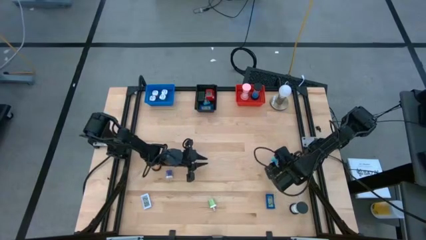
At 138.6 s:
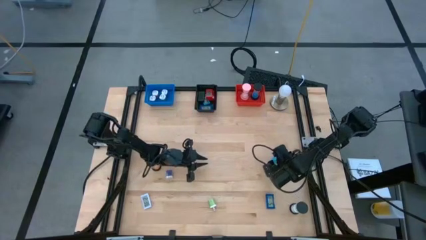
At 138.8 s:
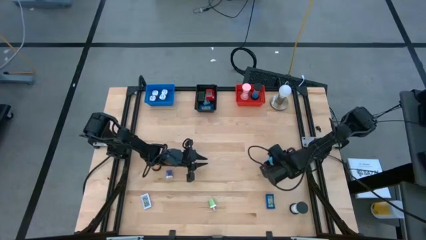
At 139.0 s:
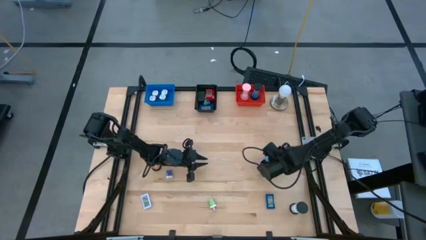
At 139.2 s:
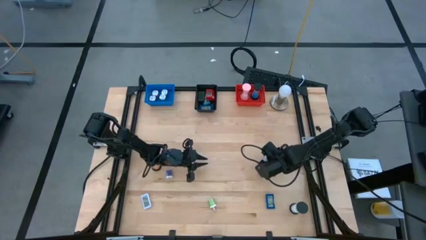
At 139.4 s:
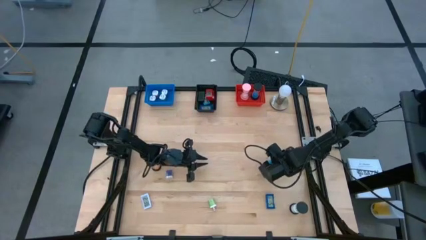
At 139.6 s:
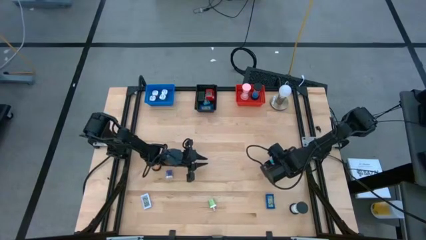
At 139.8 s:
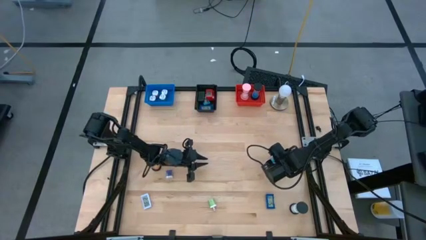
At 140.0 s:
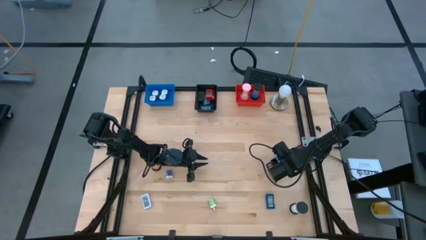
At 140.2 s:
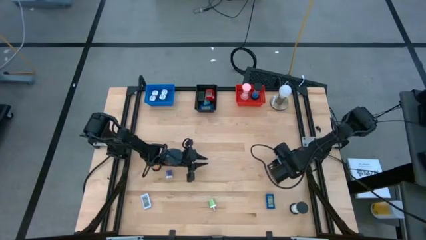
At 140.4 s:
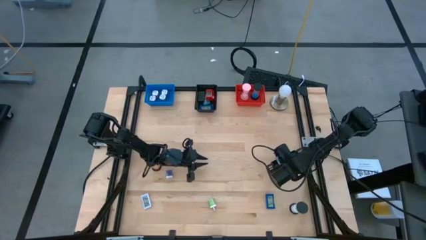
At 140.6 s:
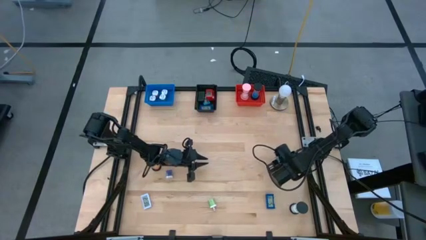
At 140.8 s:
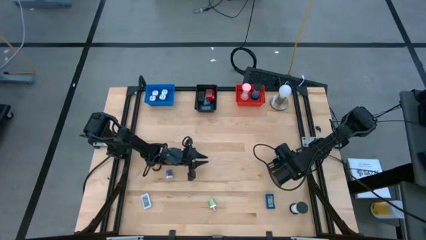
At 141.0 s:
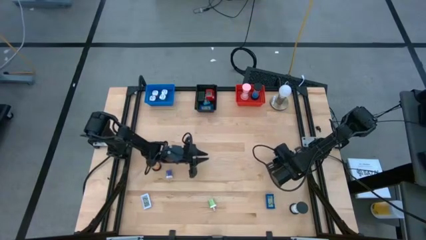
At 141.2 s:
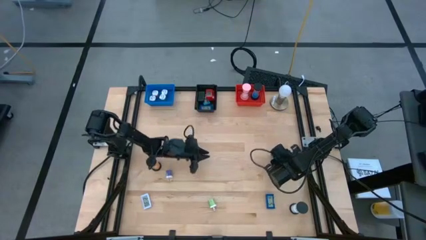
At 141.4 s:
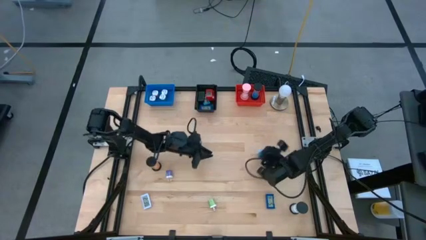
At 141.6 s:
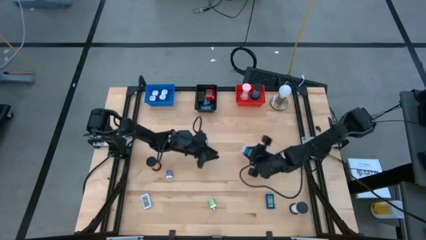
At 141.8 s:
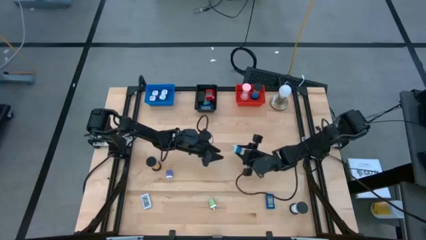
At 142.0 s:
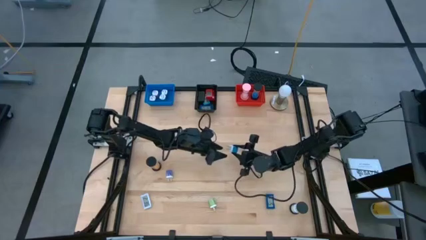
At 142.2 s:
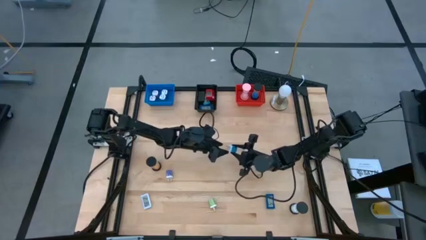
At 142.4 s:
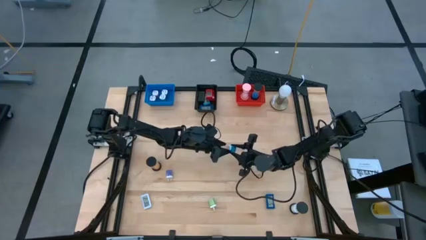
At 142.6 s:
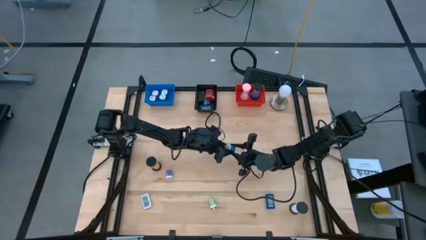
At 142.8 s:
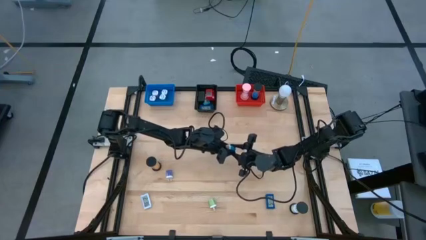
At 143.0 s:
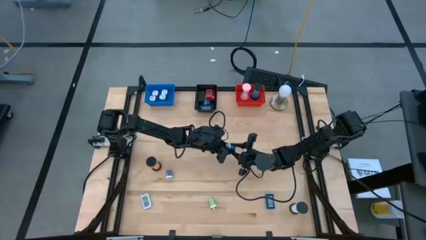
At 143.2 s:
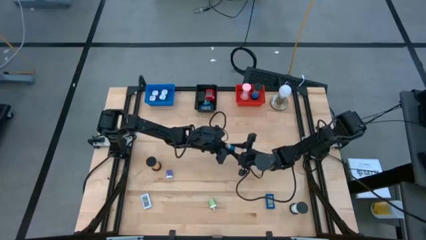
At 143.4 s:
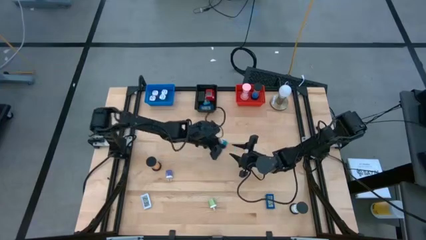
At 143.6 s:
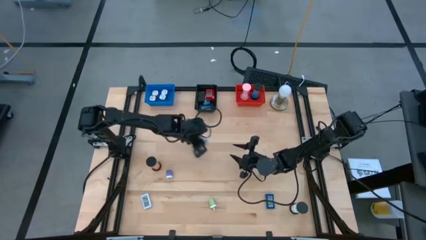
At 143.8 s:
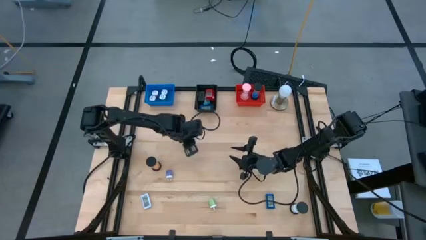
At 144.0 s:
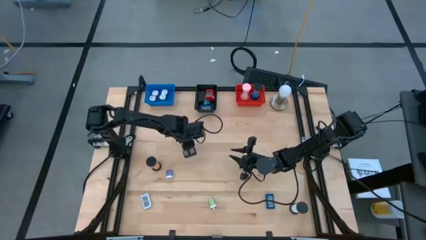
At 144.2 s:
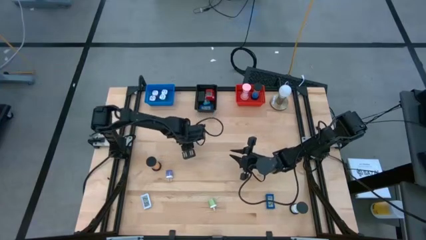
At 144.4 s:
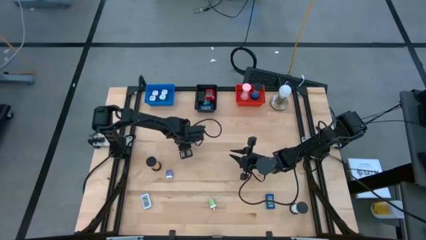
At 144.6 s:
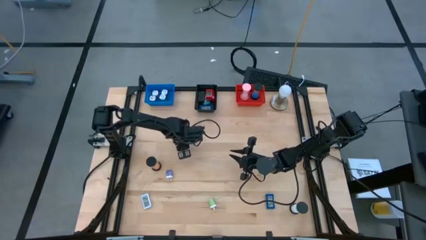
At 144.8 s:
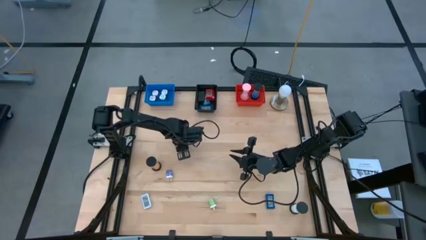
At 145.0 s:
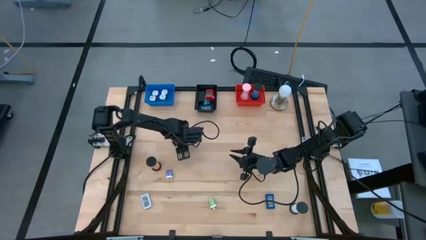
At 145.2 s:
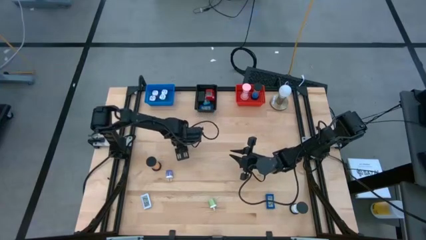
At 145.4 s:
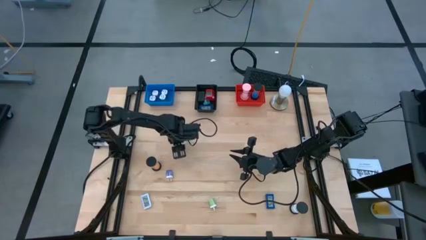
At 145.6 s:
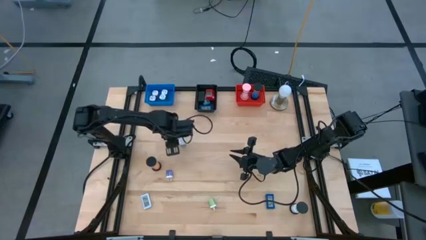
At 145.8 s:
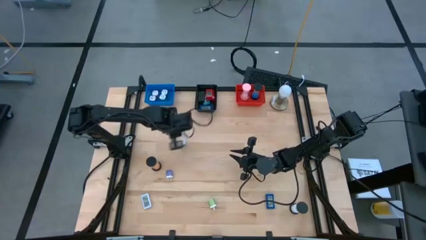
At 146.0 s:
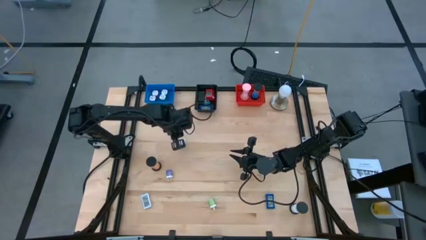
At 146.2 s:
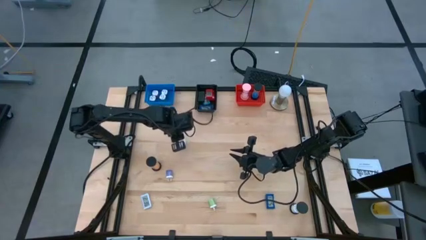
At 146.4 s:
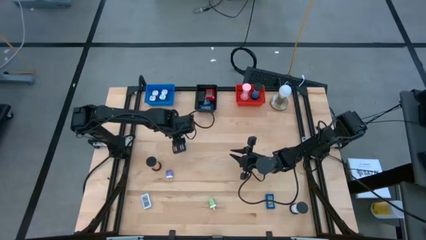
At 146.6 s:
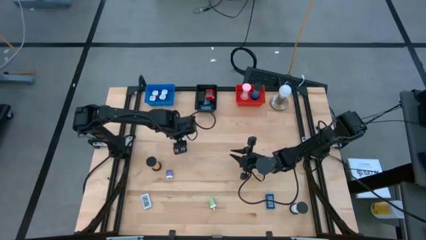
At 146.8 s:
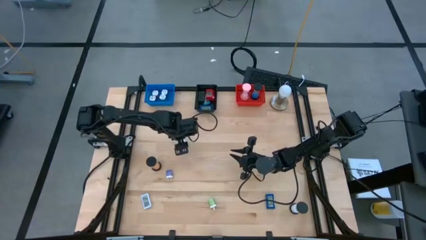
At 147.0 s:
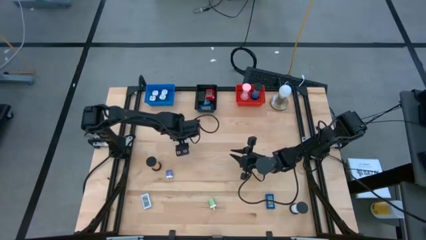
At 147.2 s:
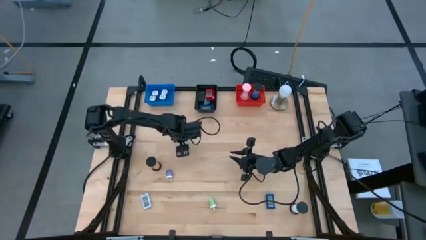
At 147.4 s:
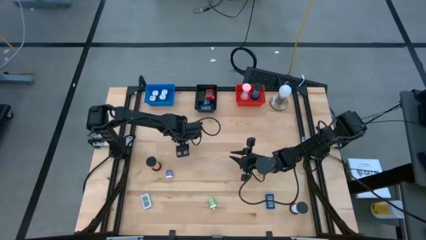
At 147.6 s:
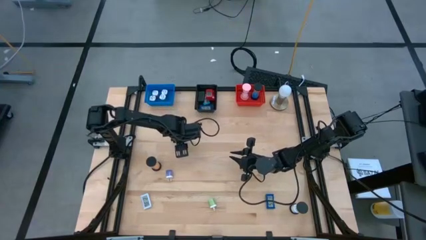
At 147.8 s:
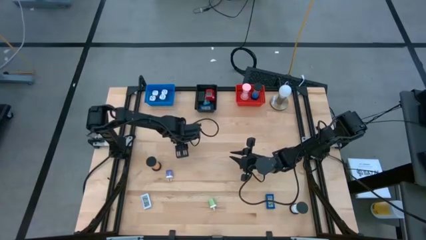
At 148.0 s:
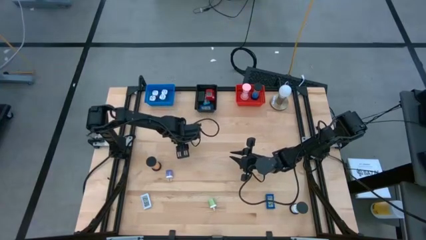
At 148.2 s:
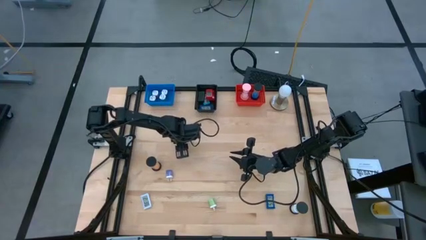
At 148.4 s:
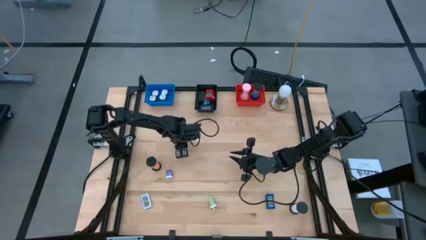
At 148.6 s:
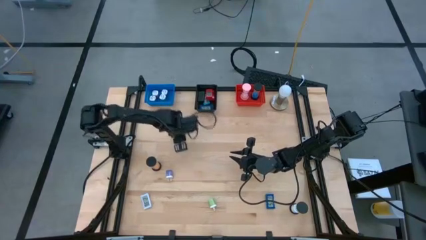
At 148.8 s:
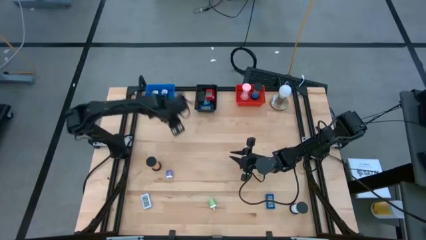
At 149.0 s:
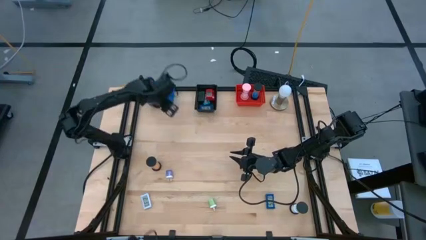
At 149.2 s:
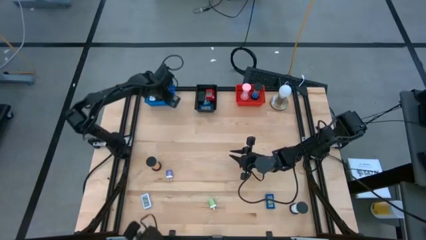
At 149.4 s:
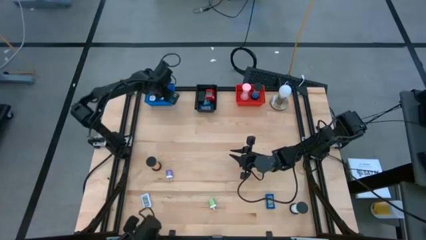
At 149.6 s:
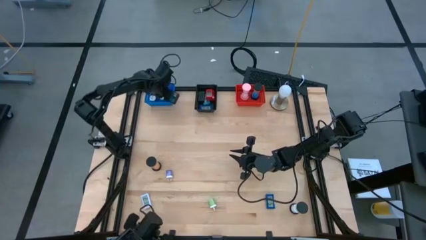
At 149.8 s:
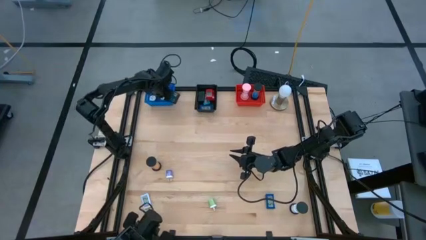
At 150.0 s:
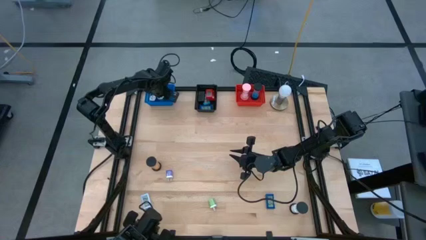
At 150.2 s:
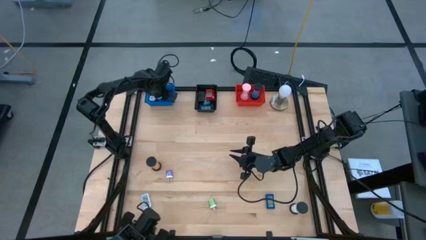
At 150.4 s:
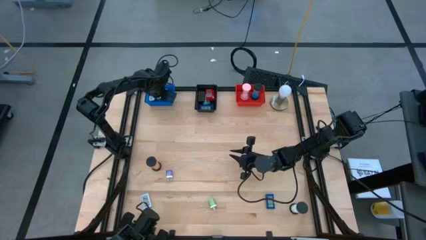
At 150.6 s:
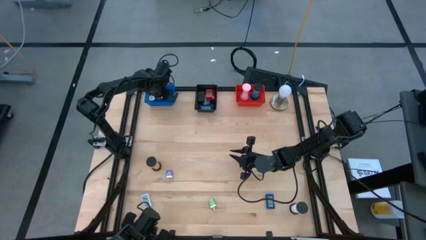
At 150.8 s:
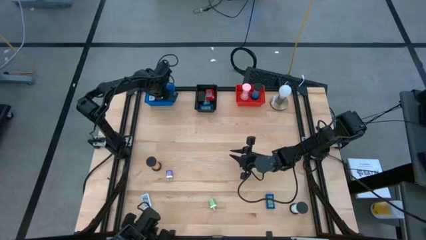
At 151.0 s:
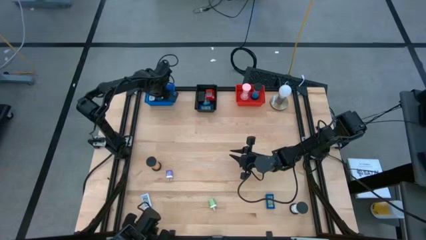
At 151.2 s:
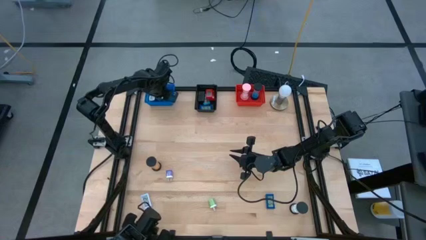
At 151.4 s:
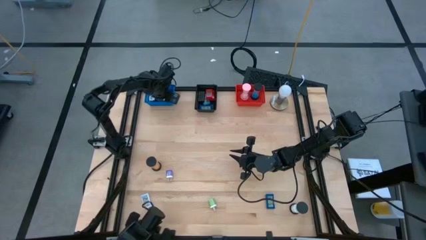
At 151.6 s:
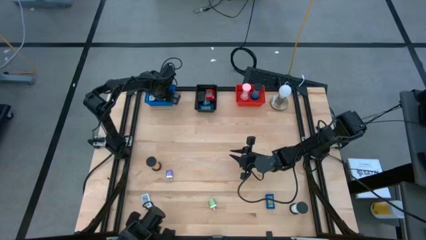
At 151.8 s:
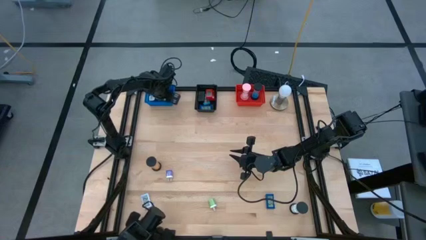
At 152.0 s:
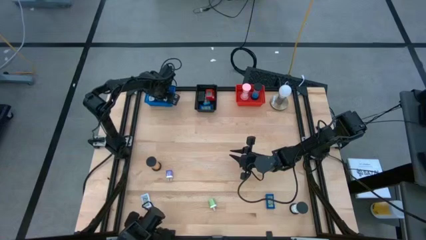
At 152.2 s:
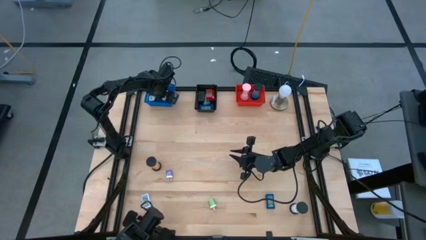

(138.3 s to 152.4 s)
Task: Pick & Place Office items
Put the light blue charger adapter into the blue bin
